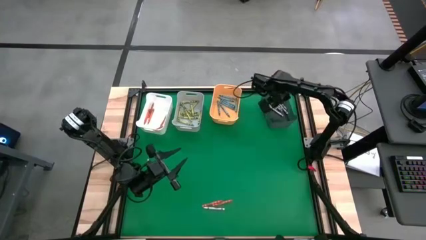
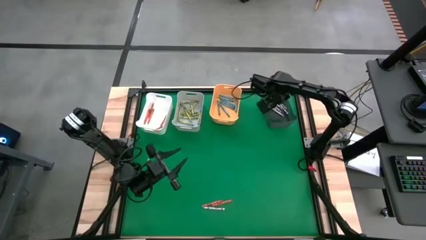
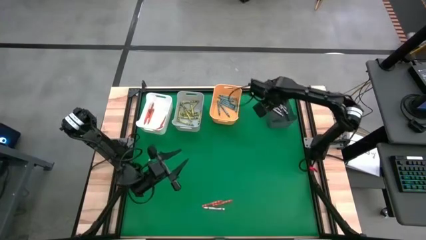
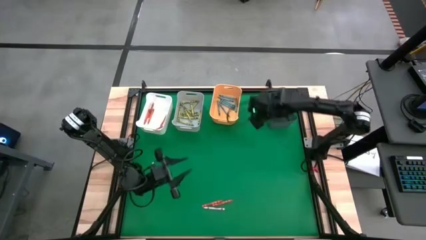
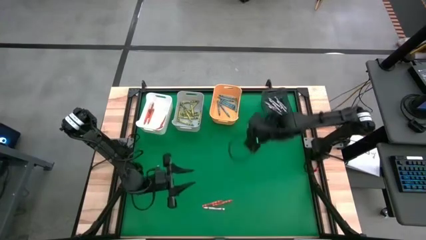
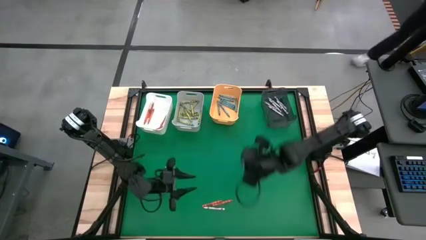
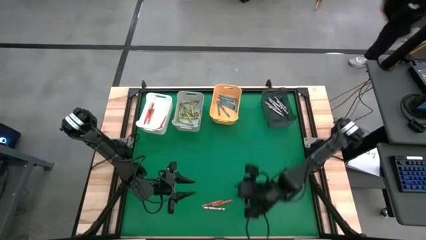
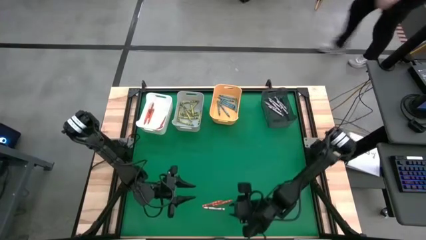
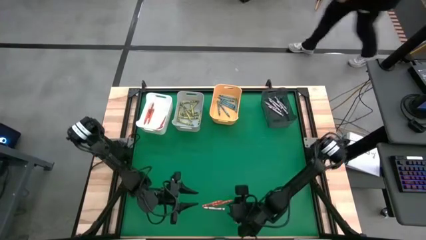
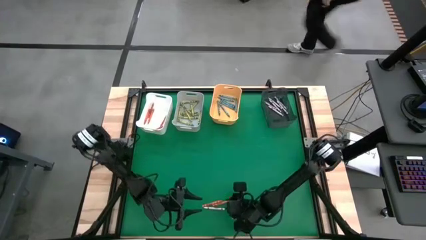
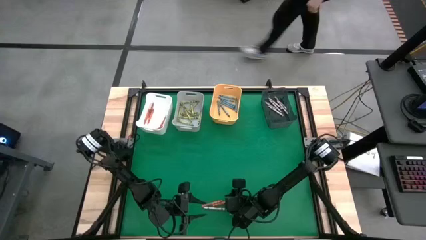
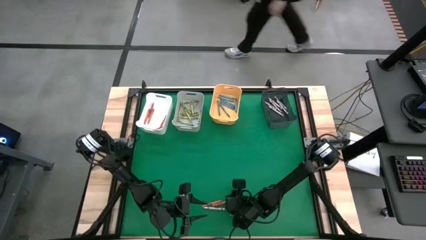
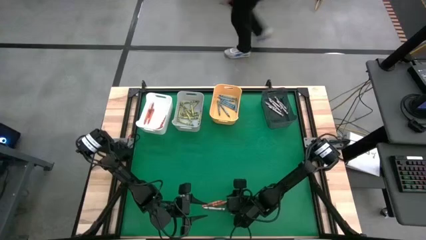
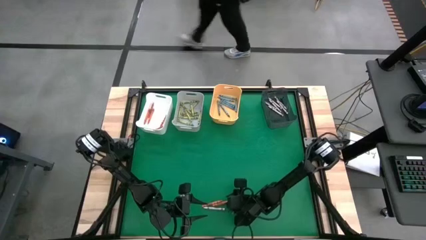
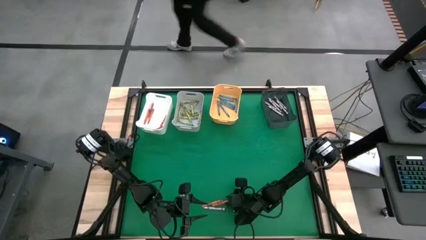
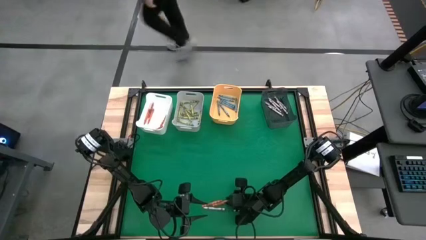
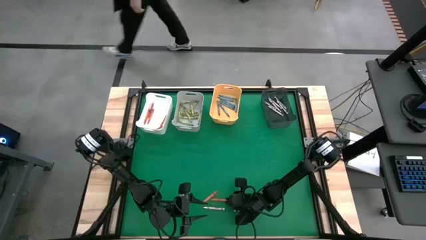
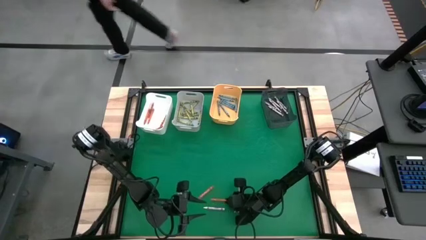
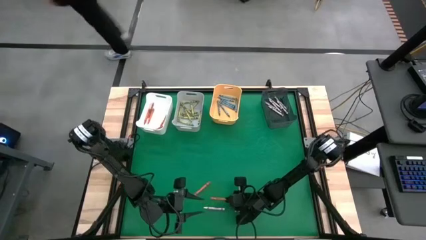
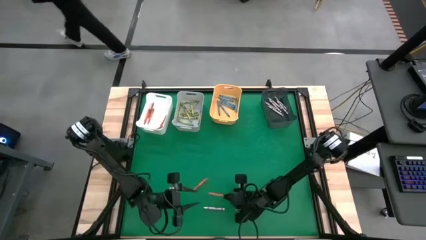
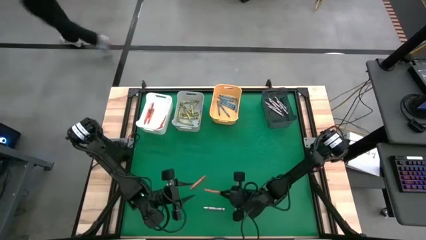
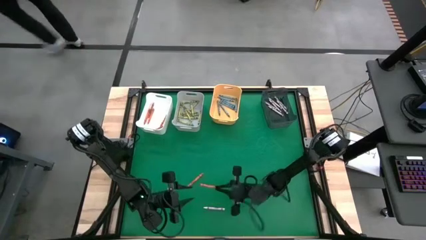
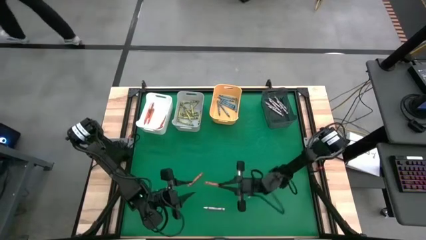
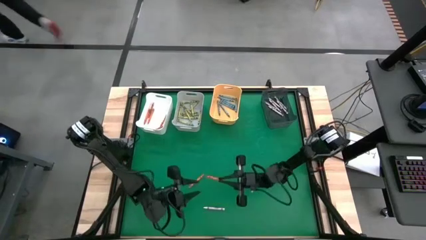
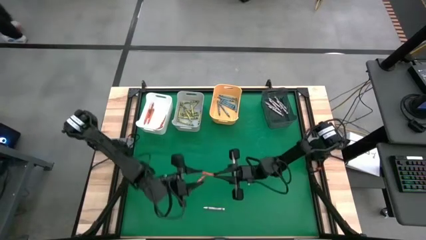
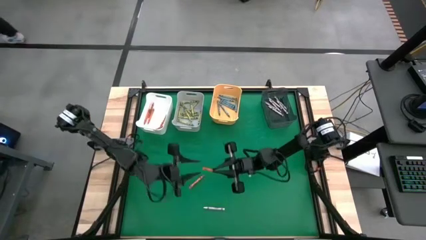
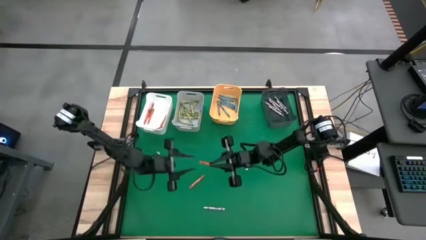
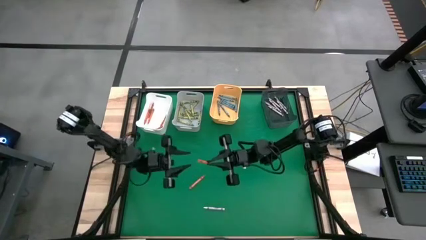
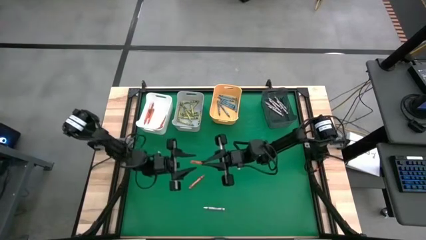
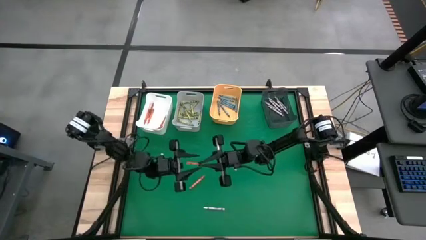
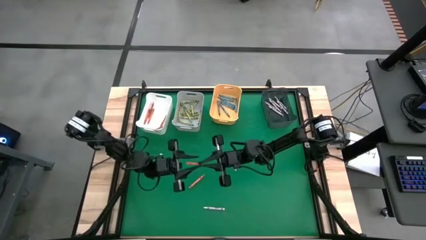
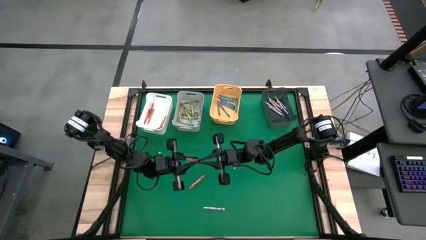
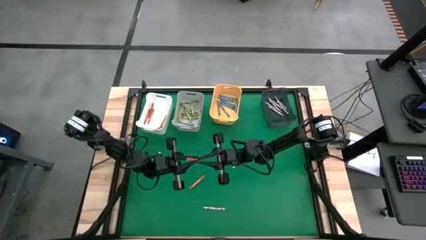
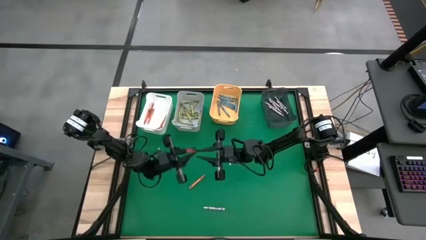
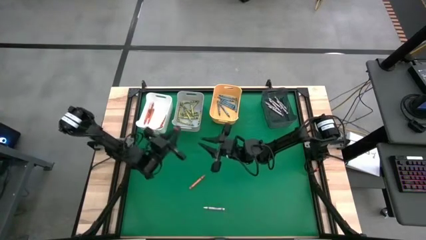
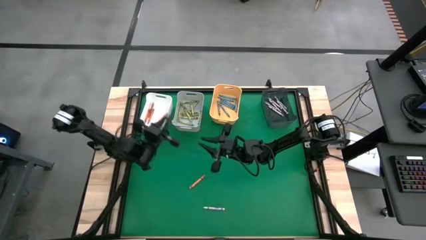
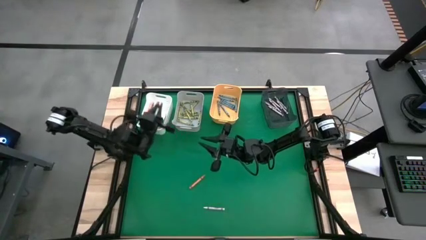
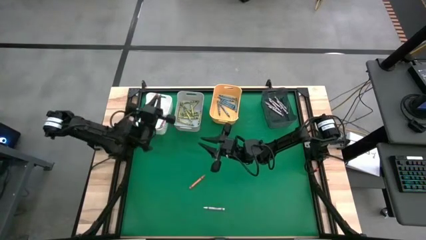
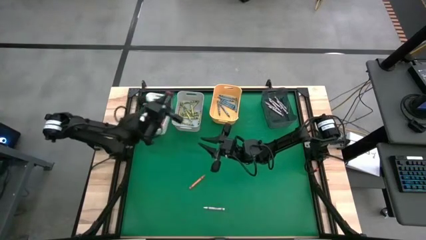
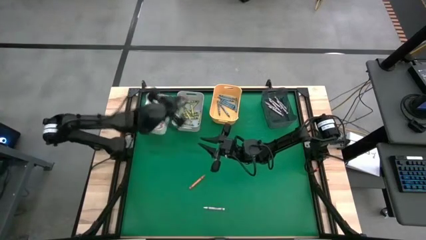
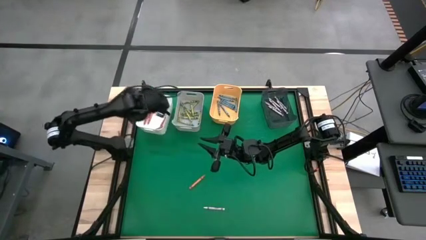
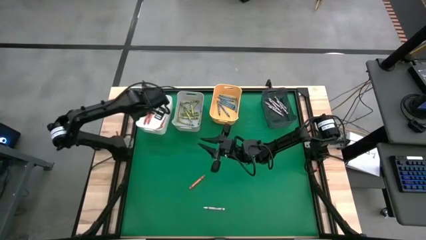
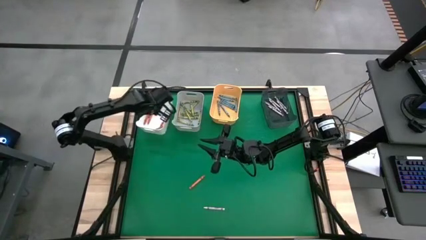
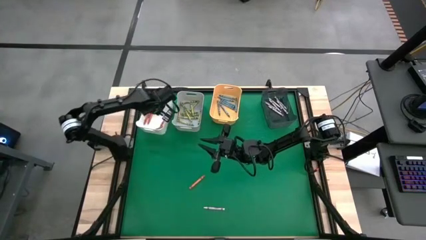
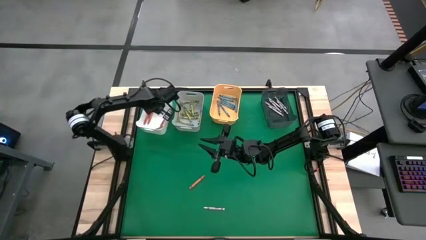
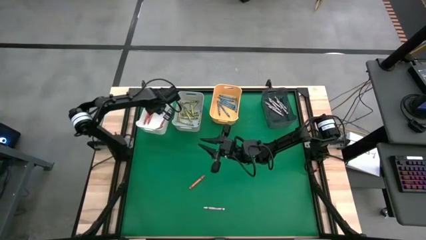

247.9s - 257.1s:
Task: Sort crayons
Put the orange crayon into the white bin

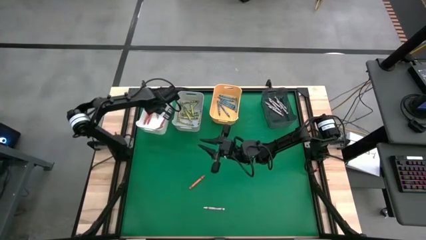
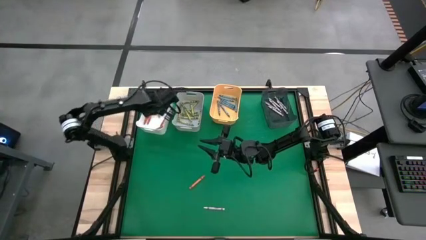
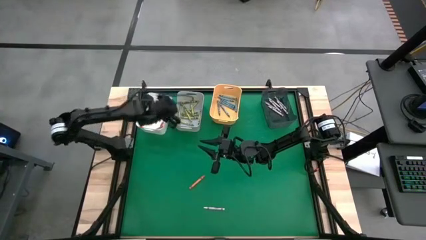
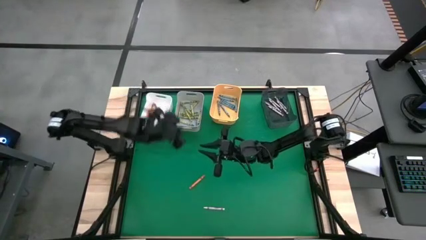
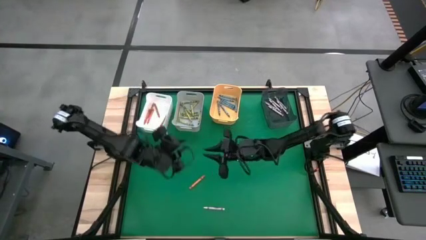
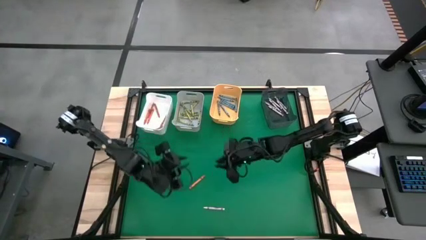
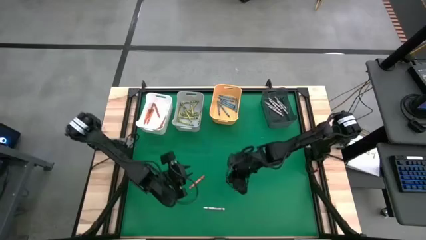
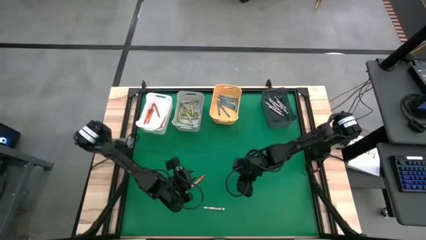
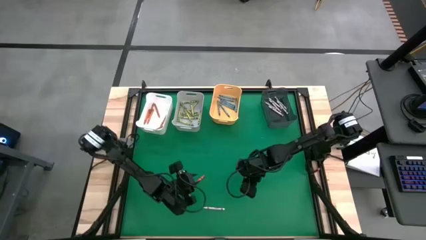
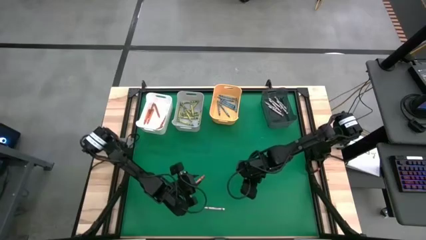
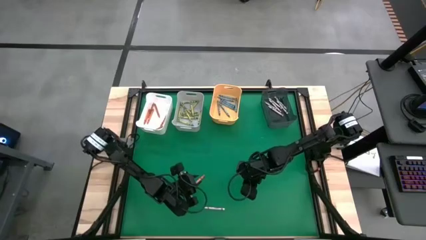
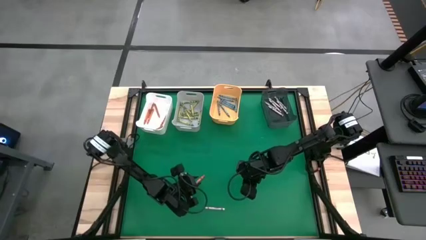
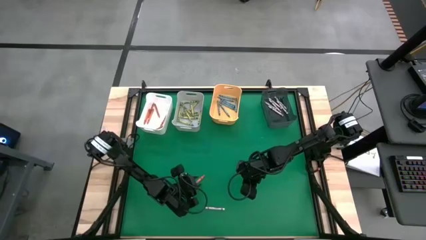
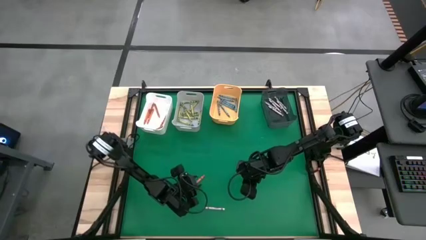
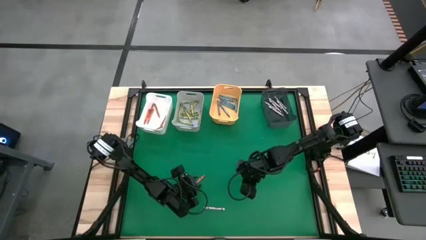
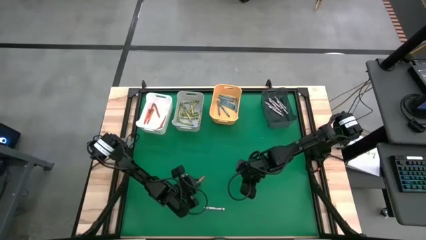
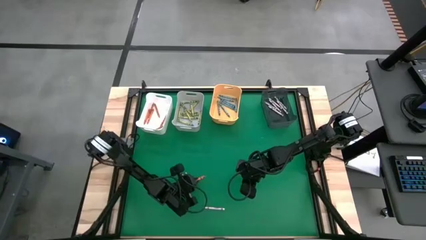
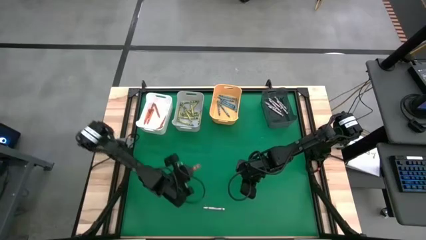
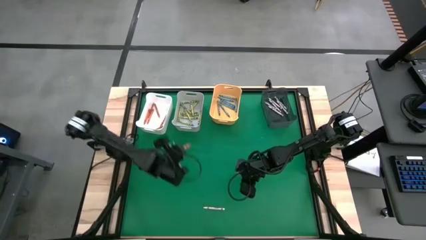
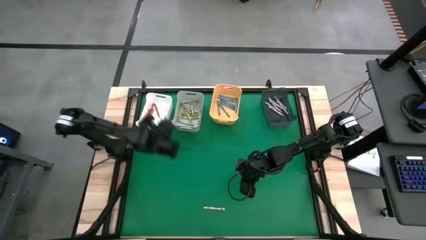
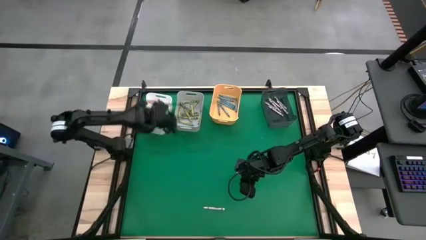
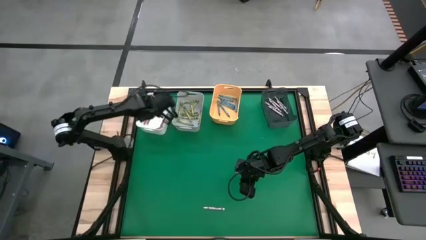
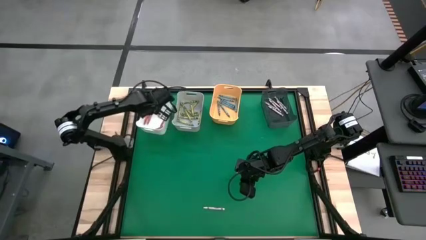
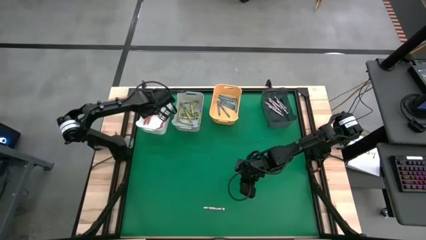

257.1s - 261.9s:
Put the orange crayon into the white bin

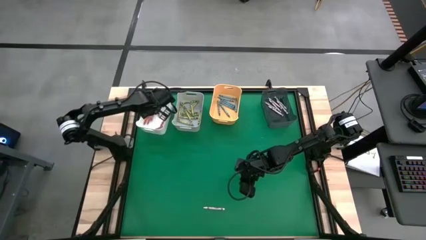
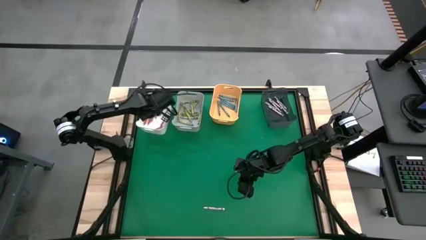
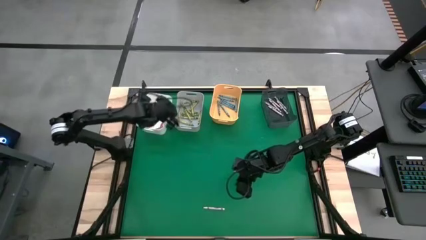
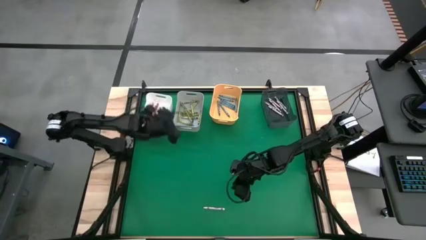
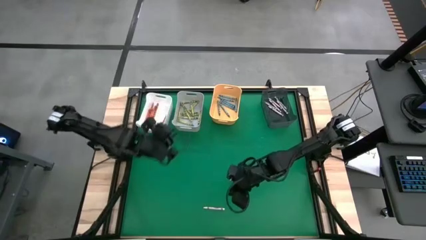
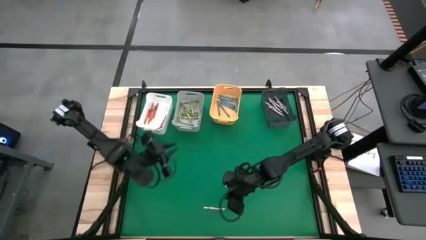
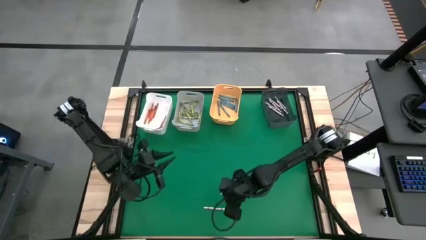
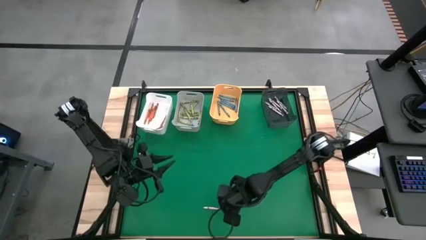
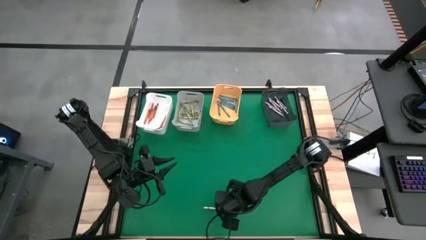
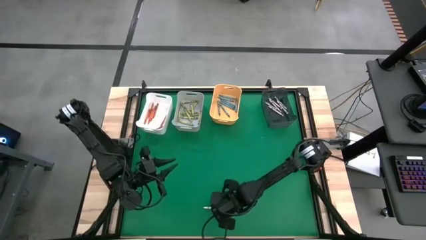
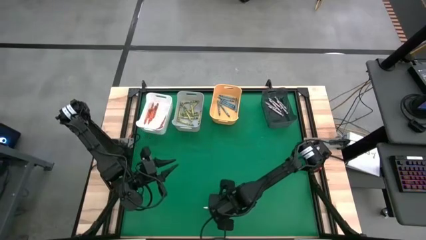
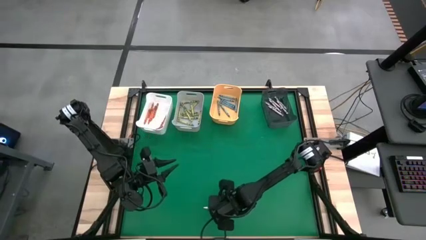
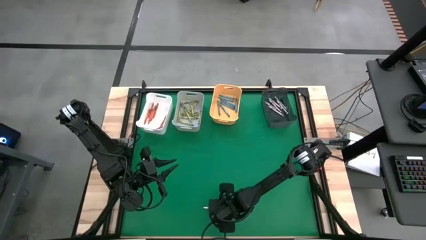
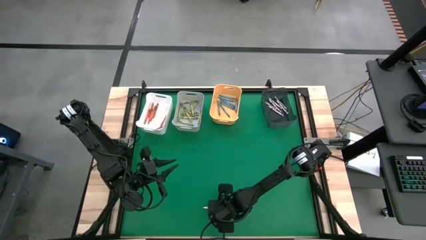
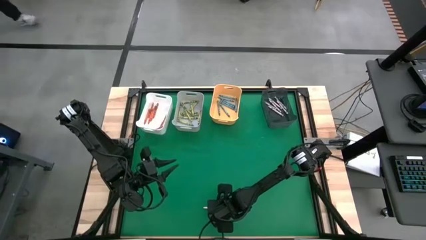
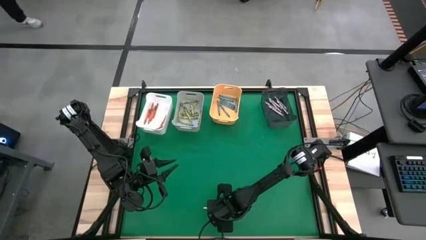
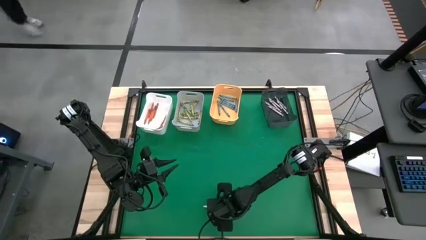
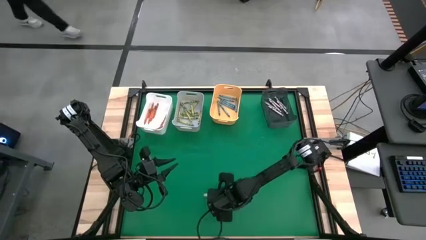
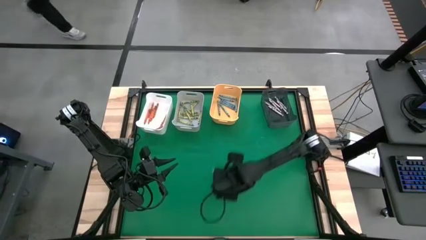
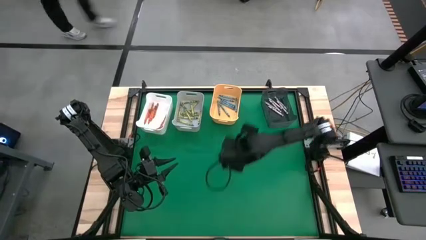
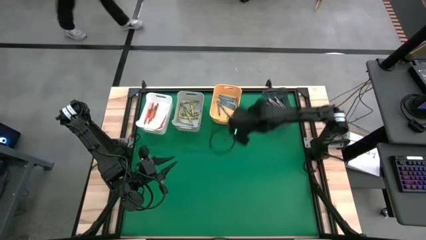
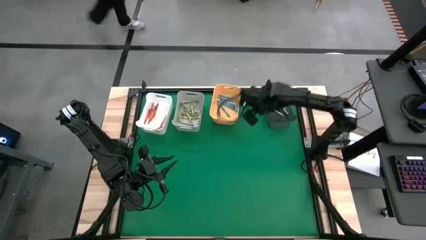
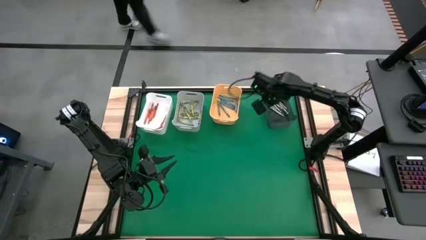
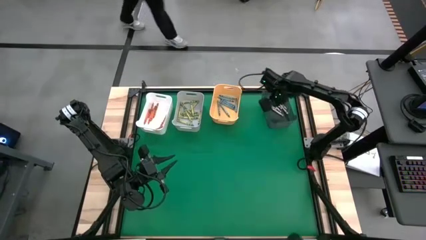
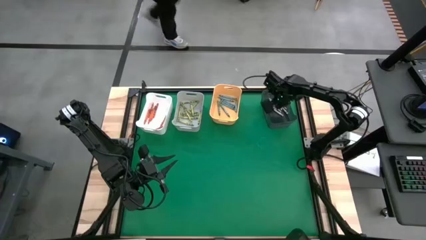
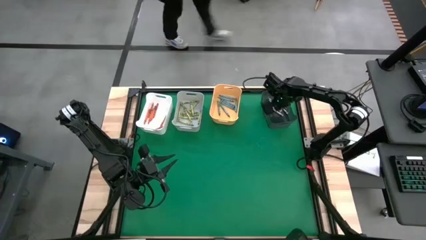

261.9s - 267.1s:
Put the white crayon into the black bin
